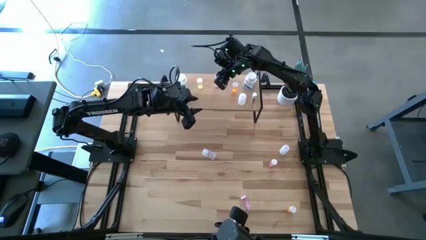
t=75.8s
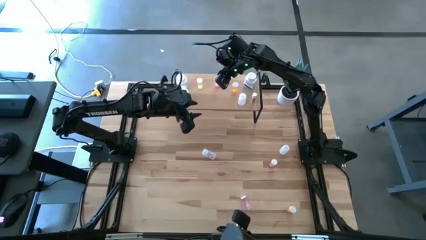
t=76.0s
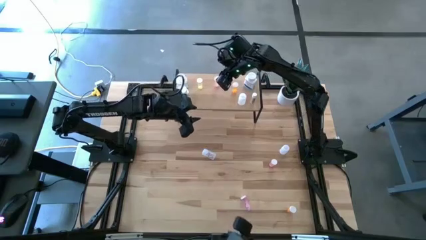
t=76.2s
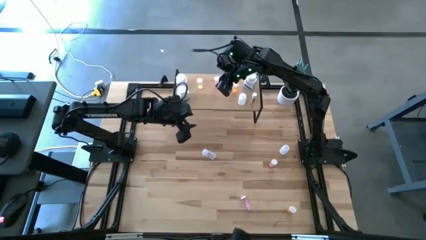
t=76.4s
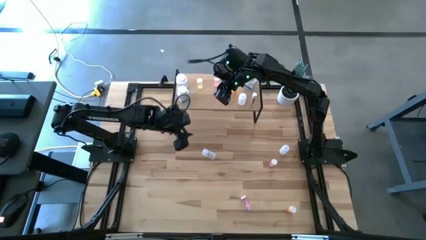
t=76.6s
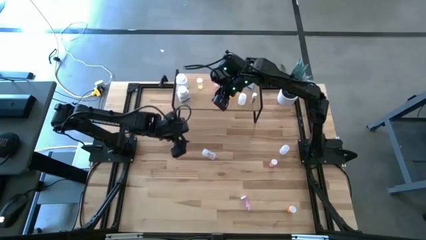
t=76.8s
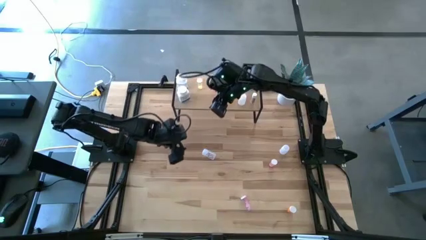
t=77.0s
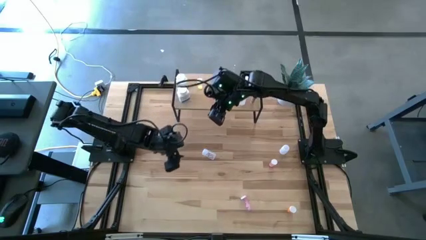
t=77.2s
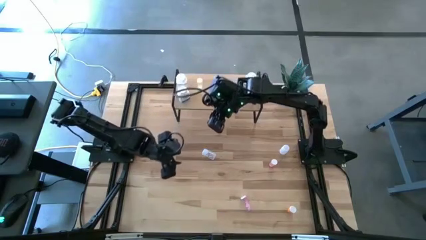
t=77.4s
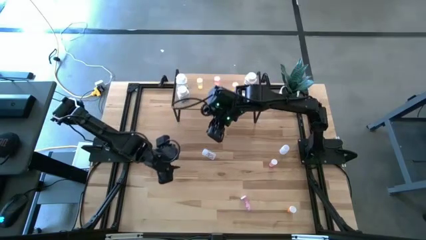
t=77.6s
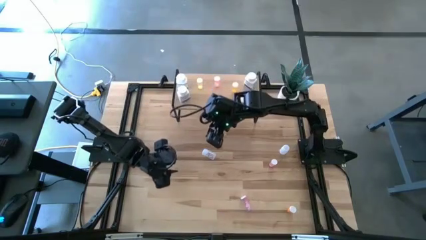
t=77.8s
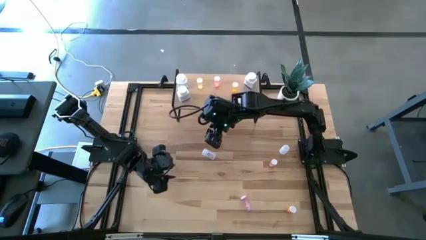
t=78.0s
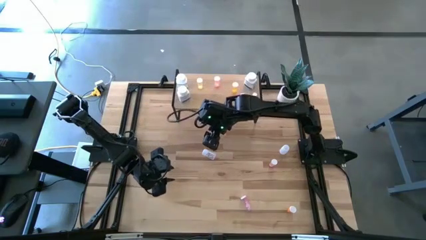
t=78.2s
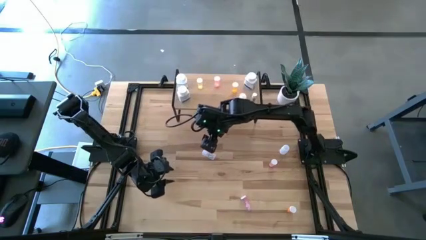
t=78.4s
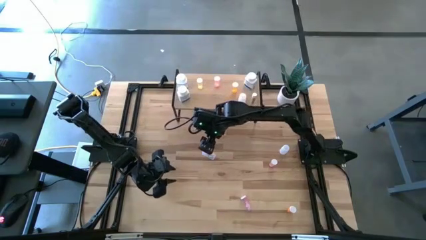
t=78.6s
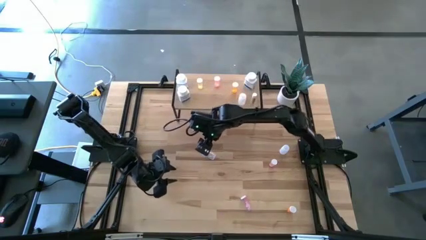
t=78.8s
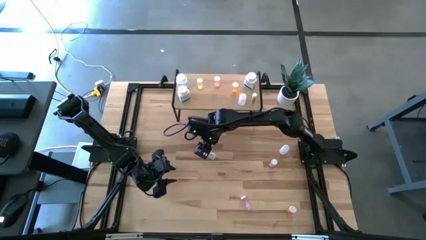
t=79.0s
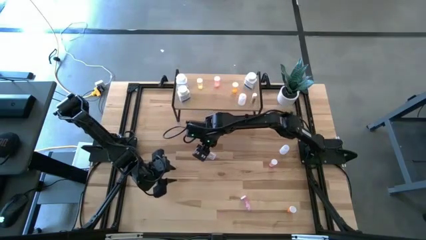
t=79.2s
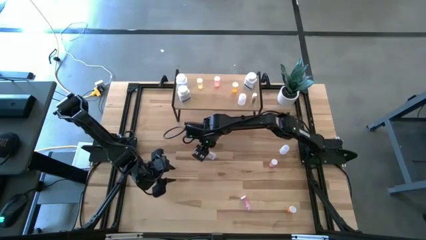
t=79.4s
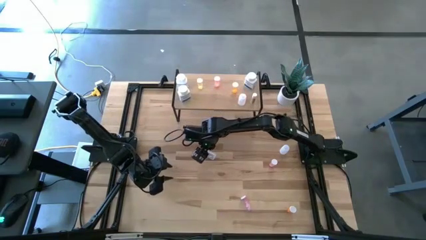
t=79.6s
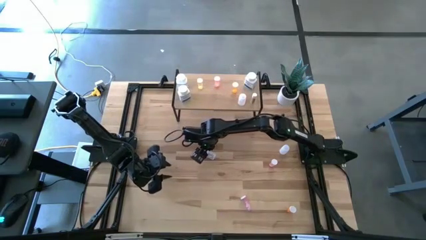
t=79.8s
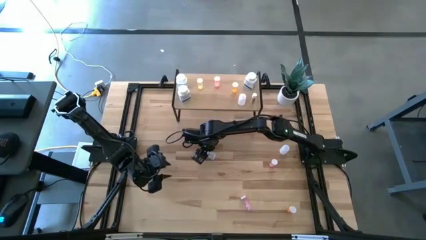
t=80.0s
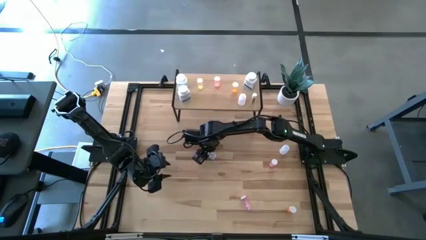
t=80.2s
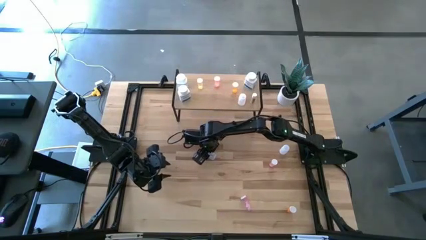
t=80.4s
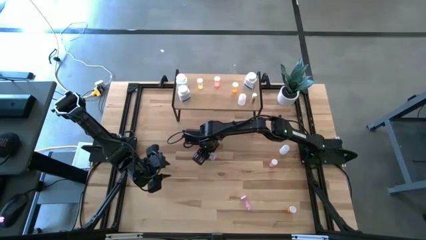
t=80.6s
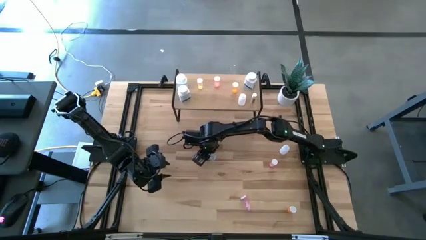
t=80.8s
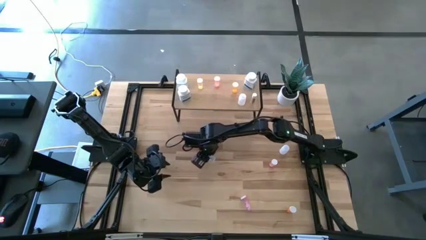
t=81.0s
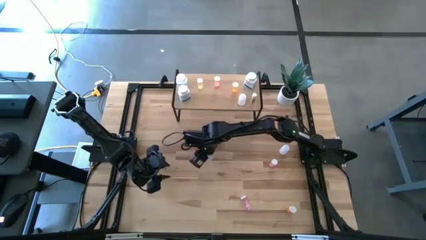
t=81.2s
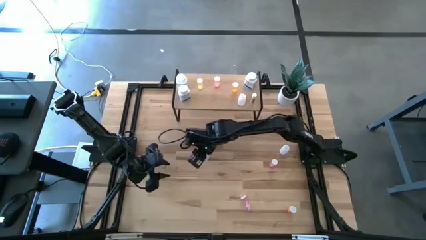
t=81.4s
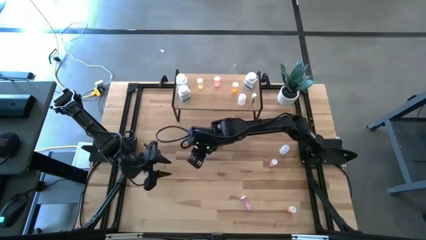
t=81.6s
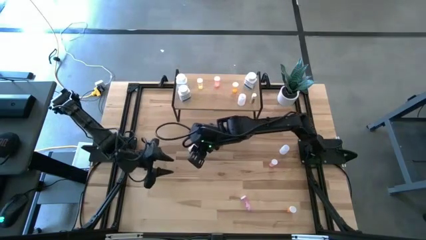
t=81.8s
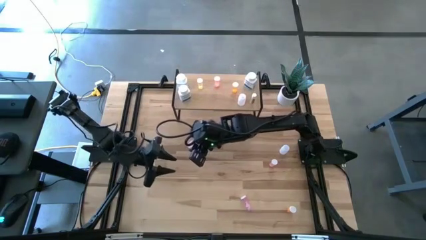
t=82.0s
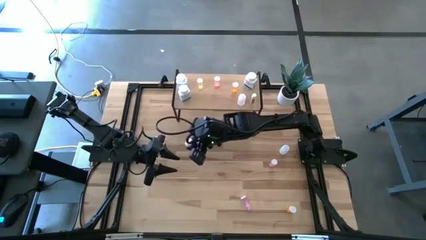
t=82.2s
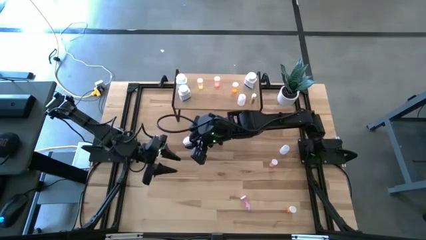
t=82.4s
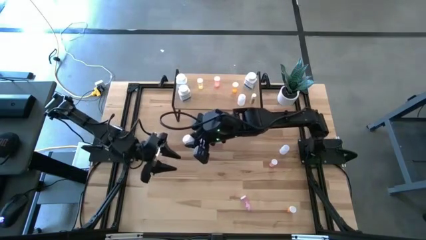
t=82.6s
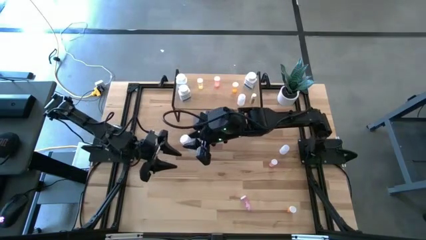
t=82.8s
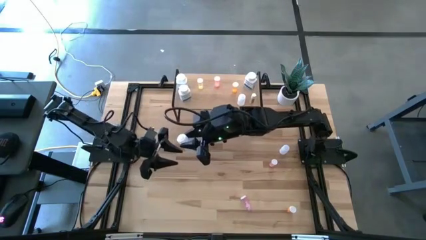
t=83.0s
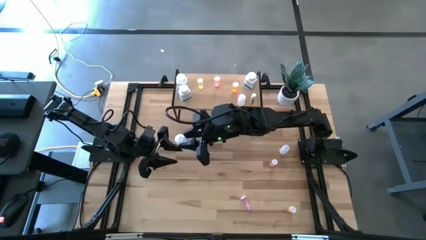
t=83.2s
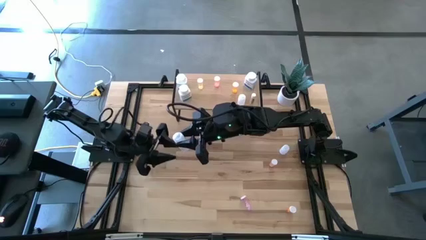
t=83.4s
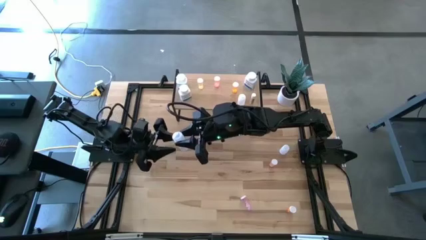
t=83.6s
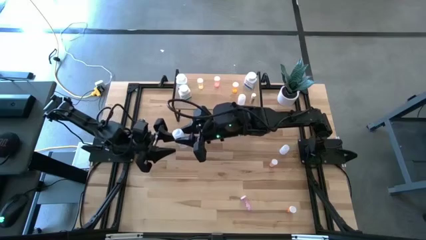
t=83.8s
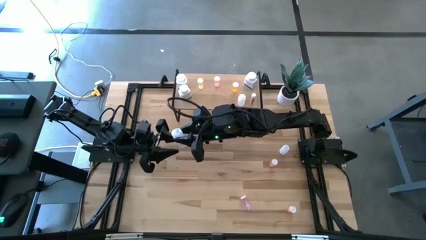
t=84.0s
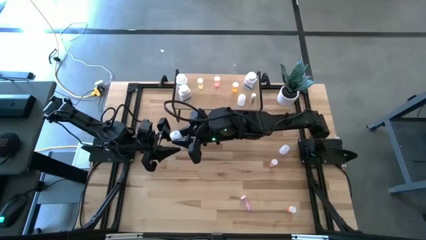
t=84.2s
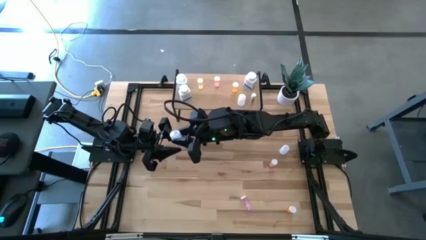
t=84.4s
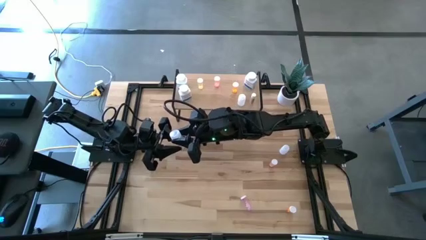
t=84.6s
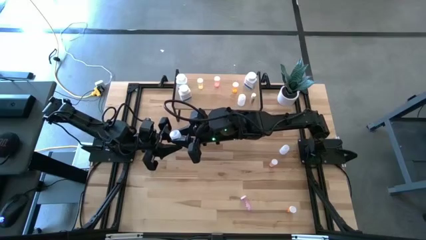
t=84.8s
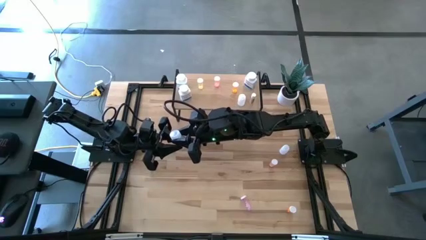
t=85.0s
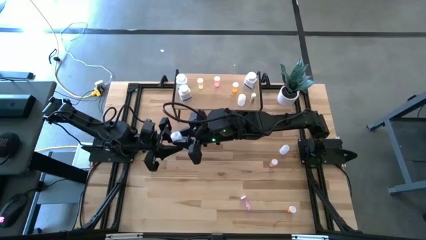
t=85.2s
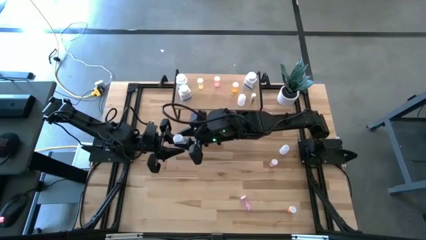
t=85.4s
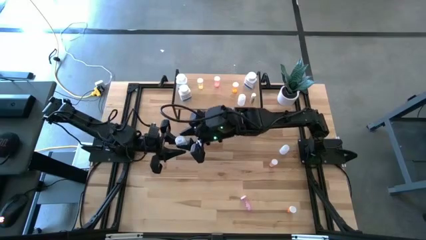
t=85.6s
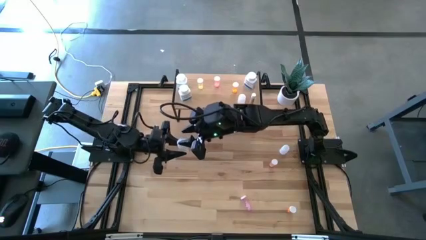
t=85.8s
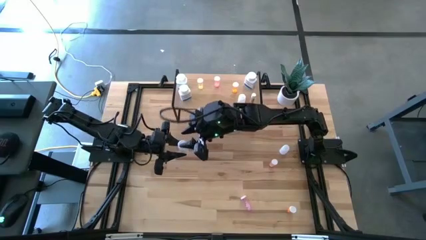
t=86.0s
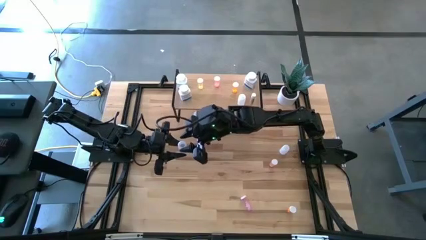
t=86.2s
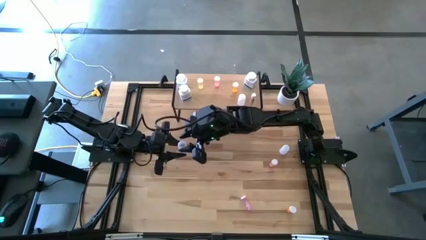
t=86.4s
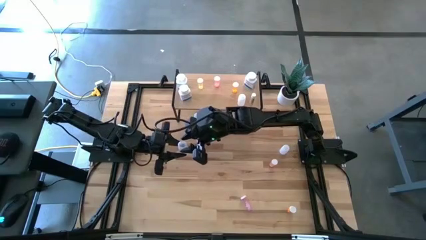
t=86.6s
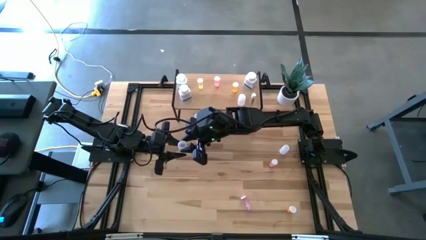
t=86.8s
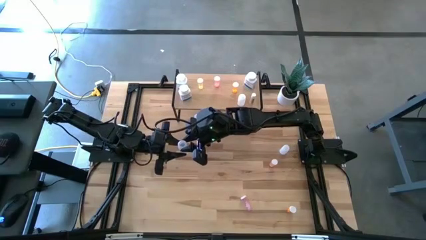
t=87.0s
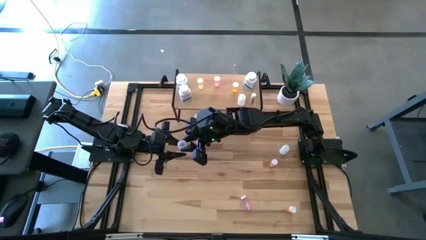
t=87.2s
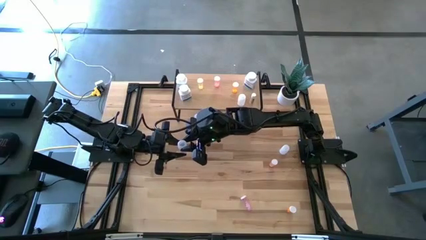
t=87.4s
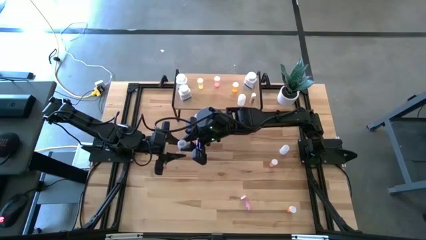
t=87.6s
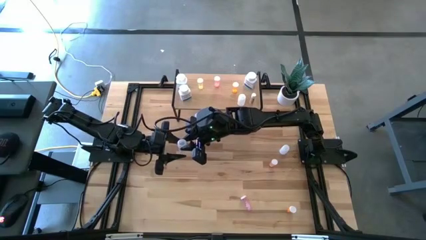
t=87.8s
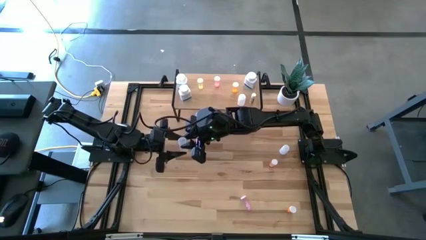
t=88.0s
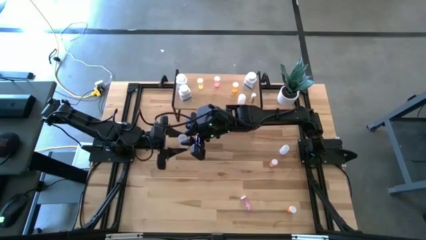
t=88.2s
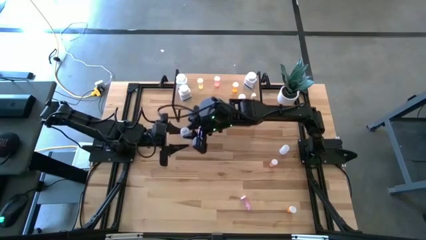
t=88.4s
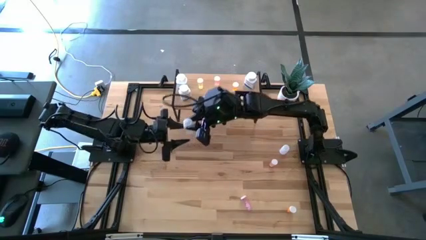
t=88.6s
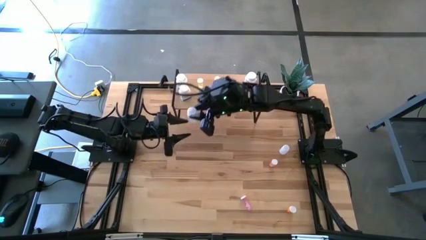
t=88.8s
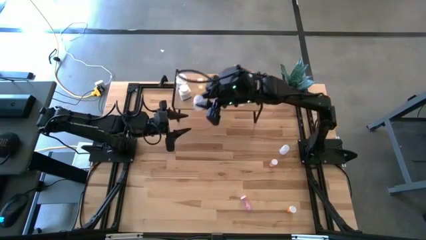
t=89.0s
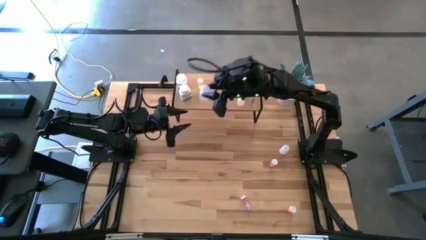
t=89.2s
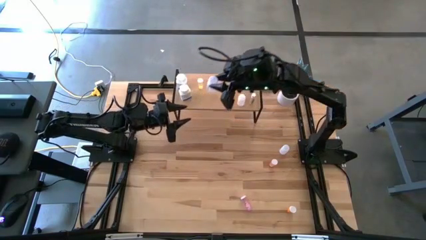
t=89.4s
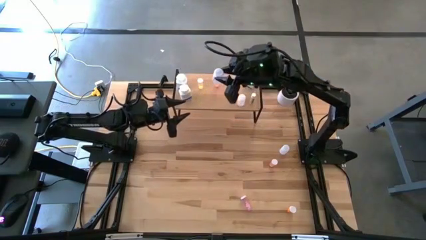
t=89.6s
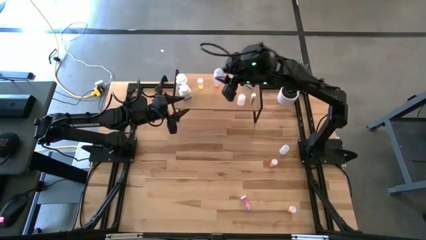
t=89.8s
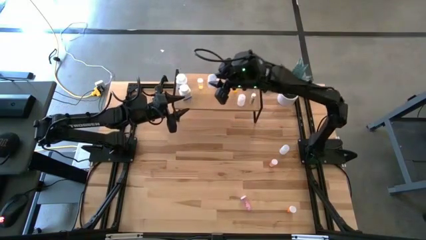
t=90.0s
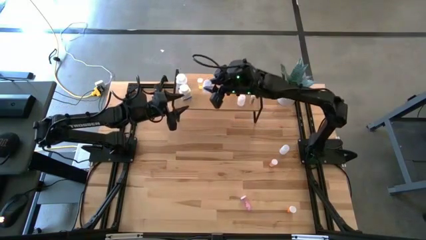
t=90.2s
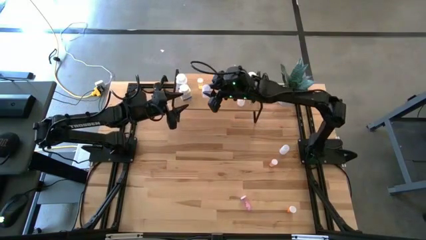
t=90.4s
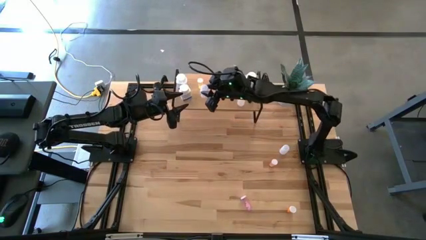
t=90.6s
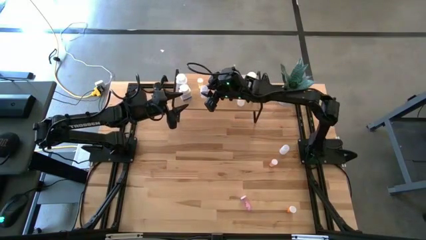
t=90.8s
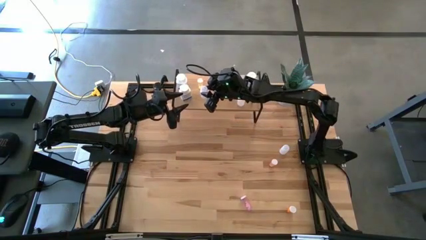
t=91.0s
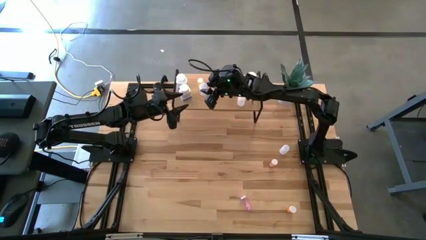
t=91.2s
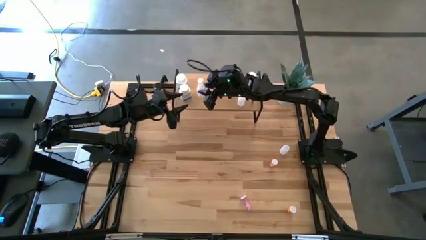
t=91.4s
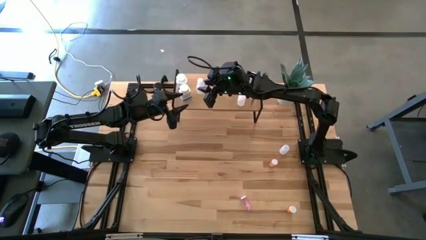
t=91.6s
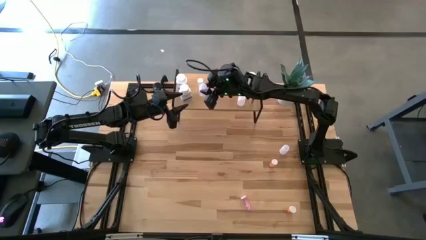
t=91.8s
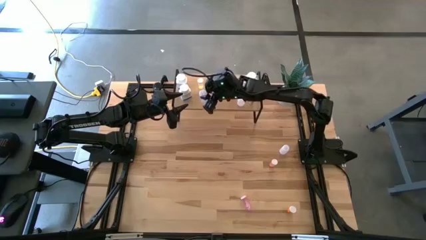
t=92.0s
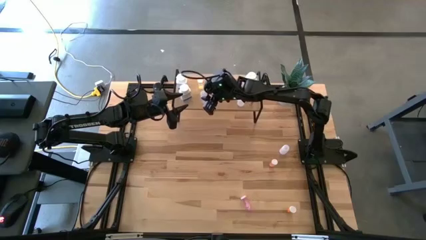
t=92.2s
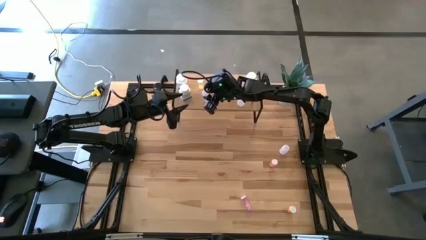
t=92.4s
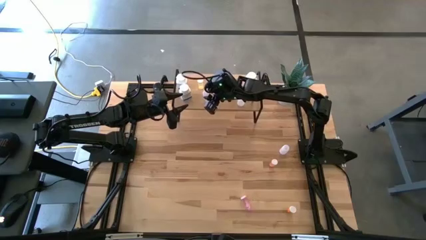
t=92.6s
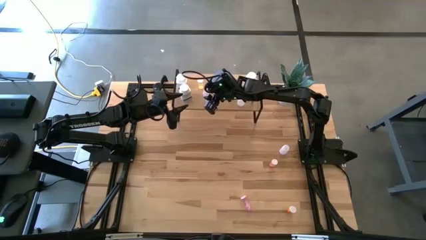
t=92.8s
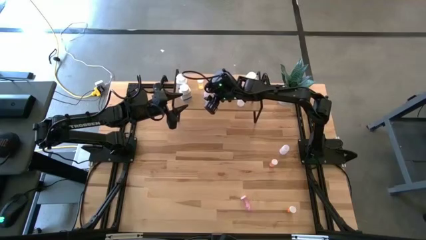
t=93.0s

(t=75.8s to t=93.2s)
Task: Pick and place medicine bottles onto shelf by color
Put the transparent pill bottle on the shelf
